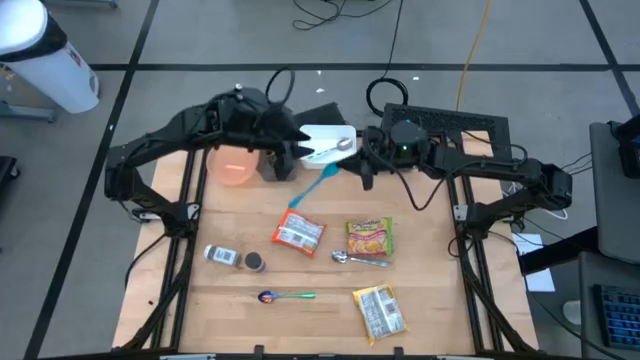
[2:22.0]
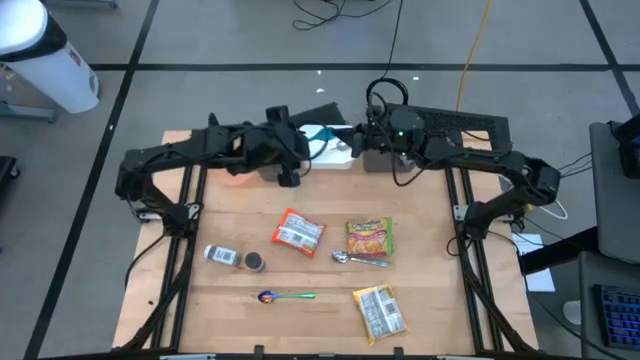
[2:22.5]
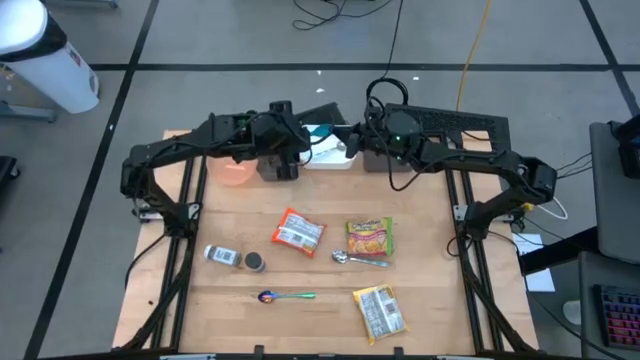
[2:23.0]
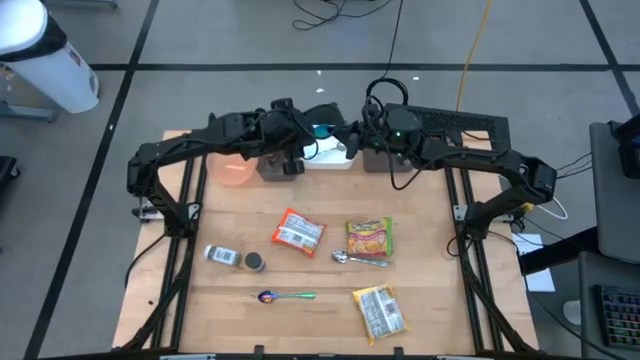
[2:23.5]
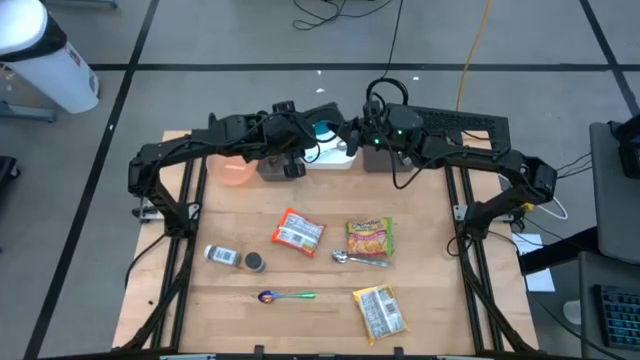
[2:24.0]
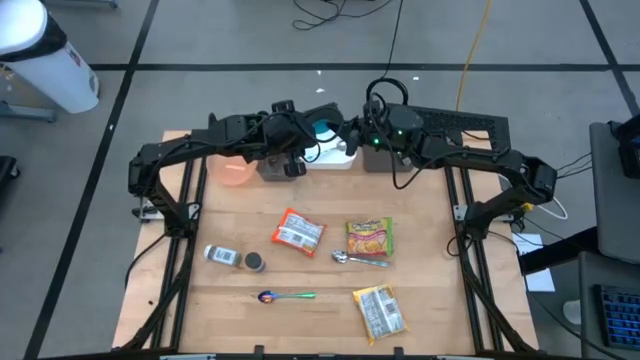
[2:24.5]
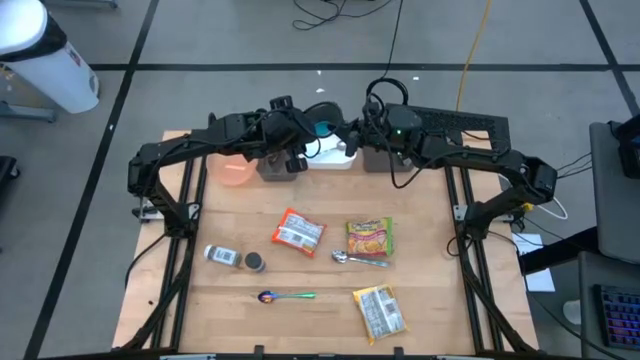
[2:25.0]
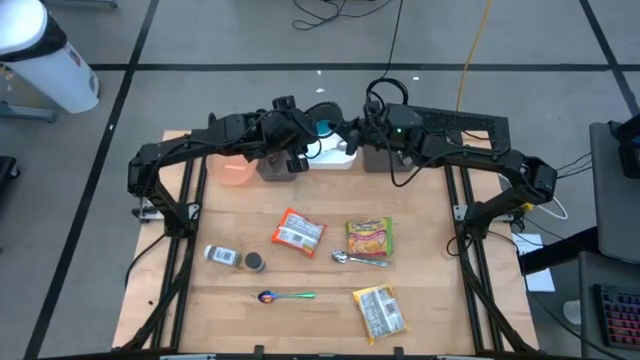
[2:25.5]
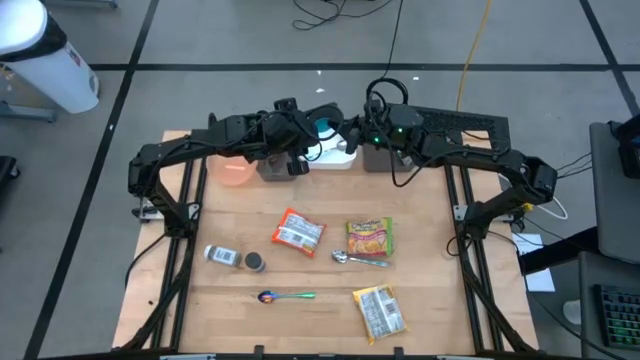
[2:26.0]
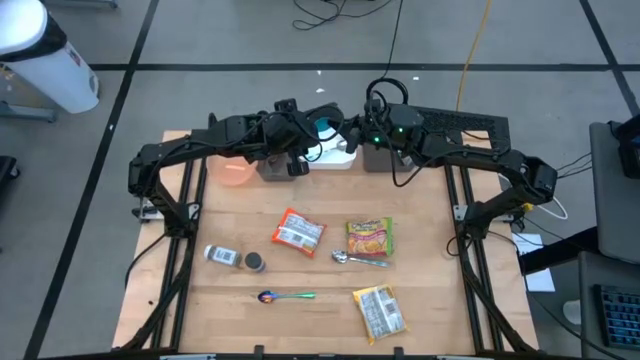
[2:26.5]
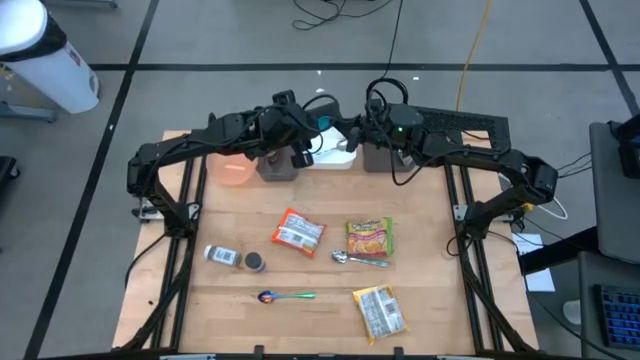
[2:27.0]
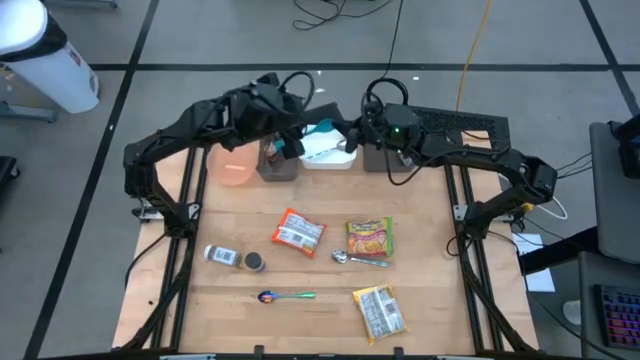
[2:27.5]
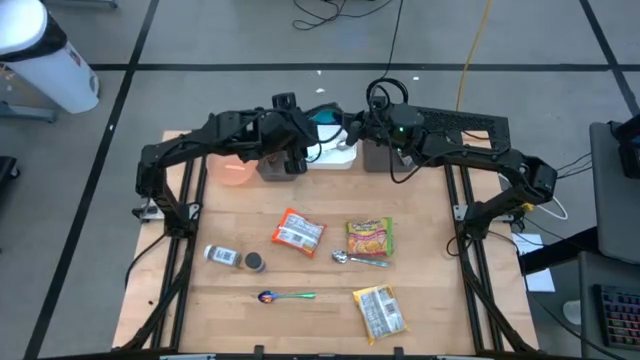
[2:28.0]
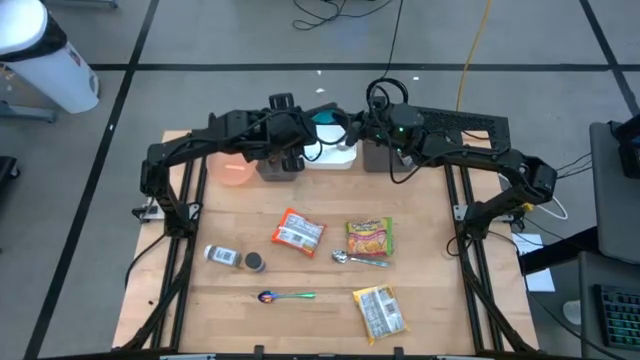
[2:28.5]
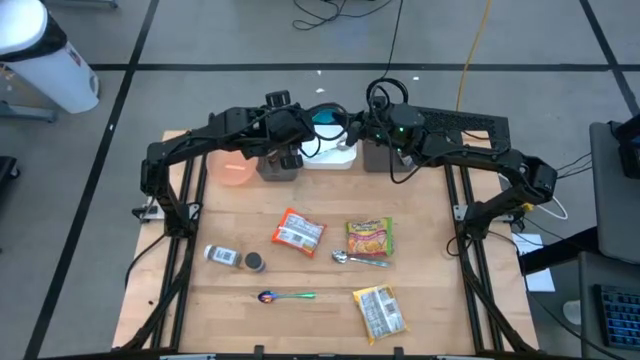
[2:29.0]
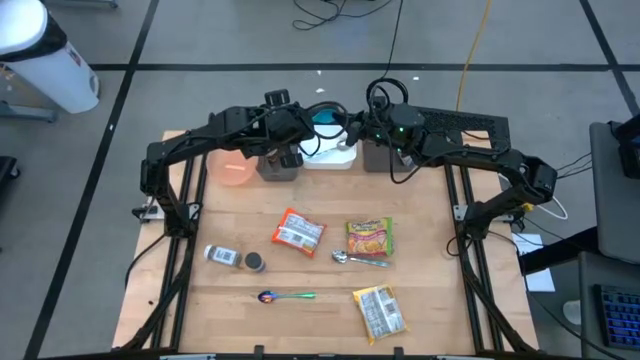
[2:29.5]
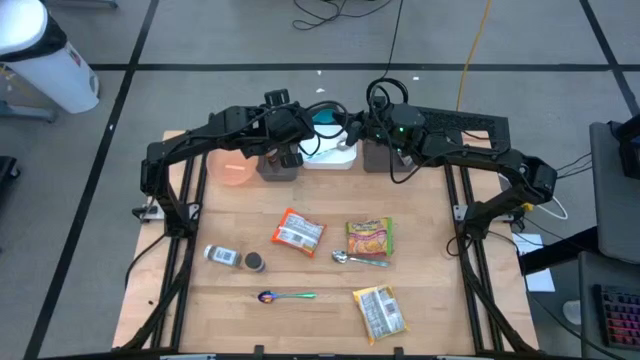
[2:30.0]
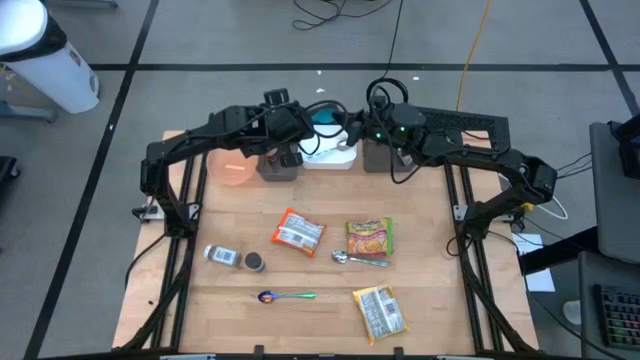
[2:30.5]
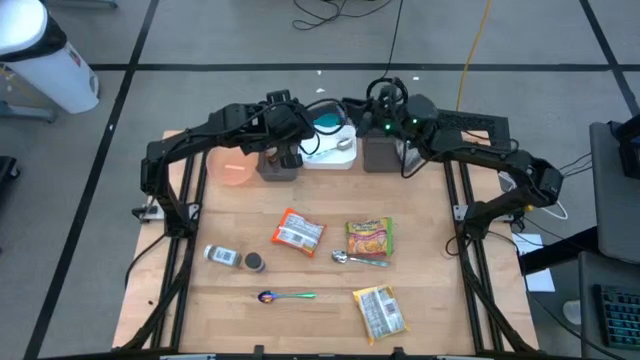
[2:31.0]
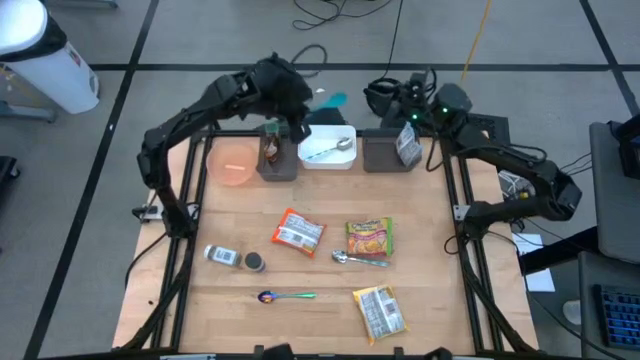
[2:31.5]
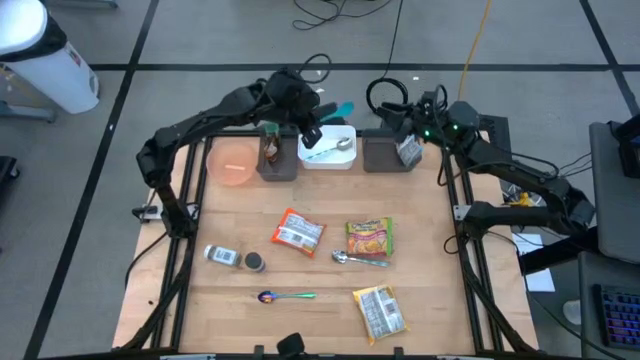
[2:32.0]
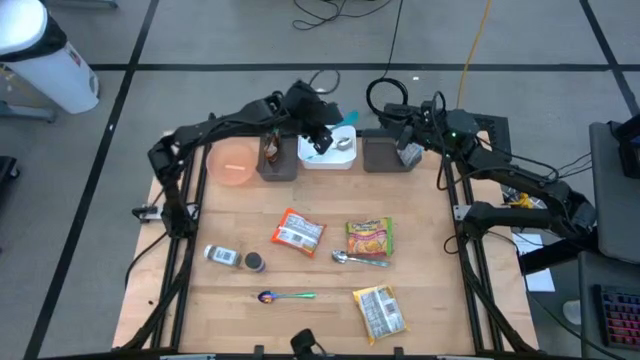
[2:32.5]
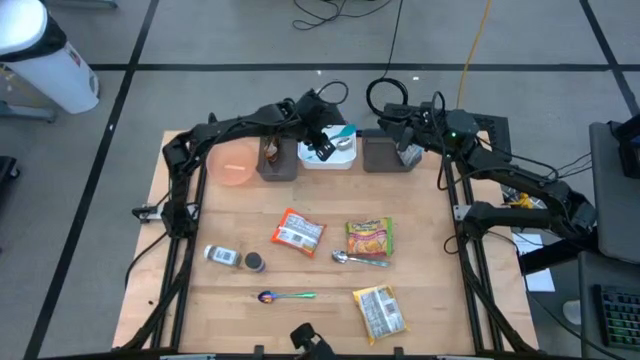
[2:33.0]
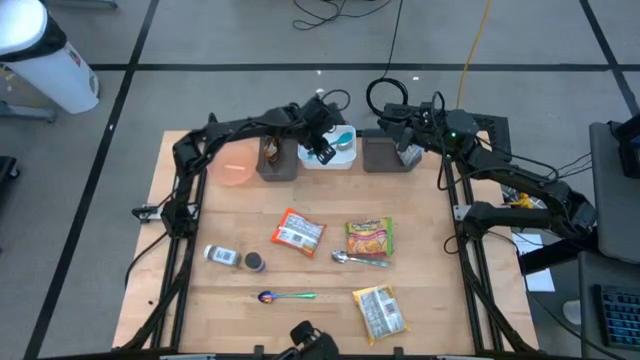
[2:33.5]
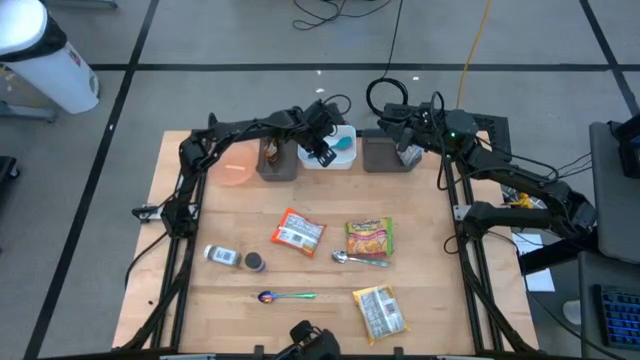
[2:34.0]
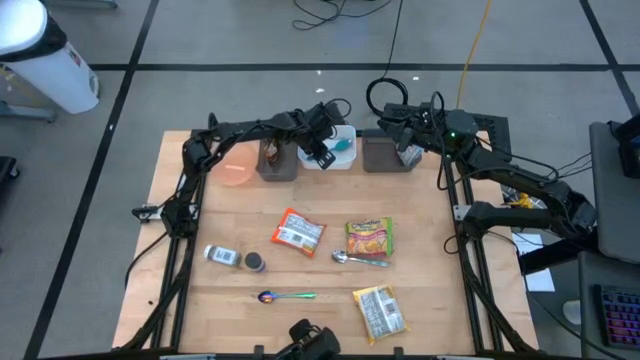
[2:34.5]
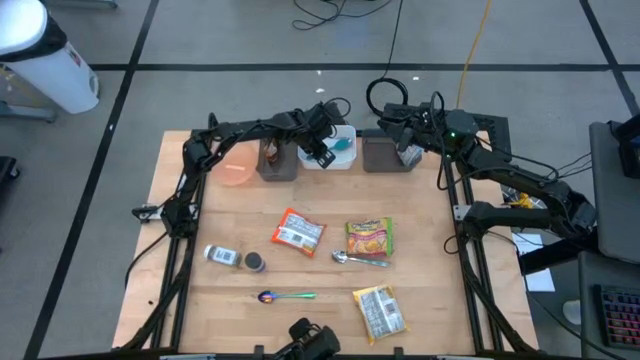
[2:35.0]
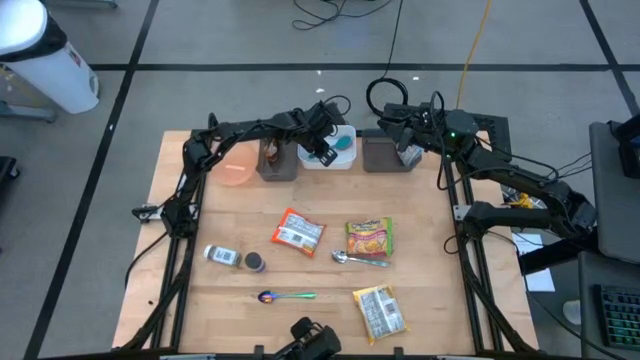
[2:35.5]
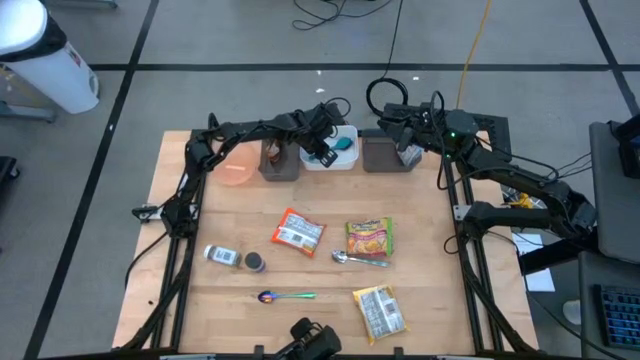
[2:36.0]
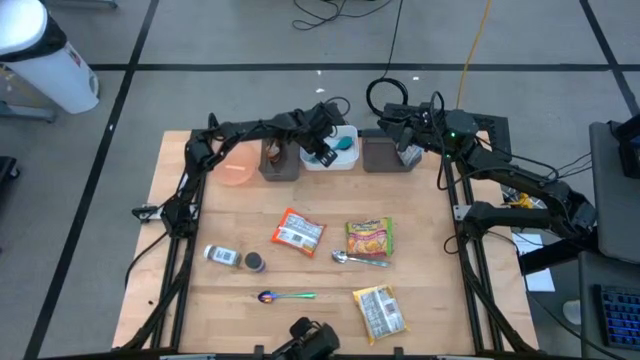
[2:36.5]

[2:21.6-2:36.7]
Task: Pick & Place Food Item
Put the blue baby spoon into the white bin

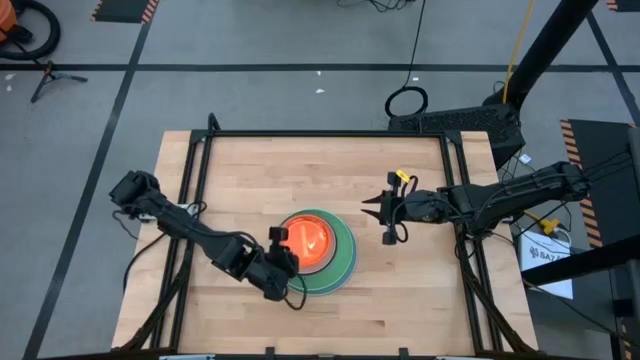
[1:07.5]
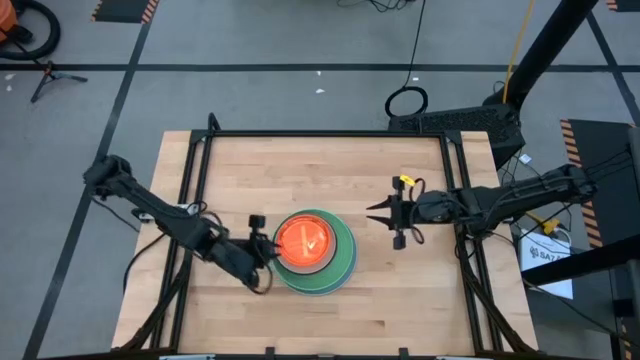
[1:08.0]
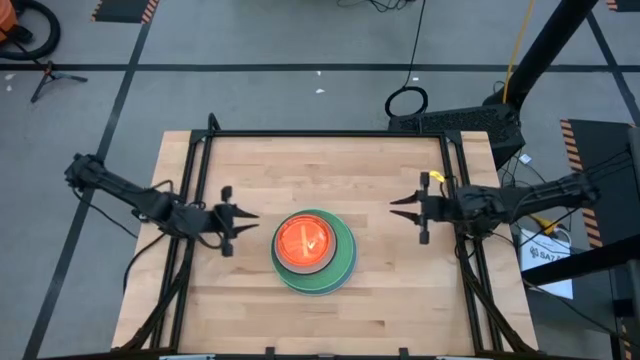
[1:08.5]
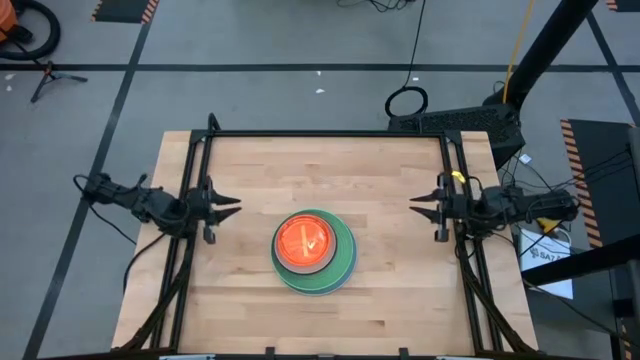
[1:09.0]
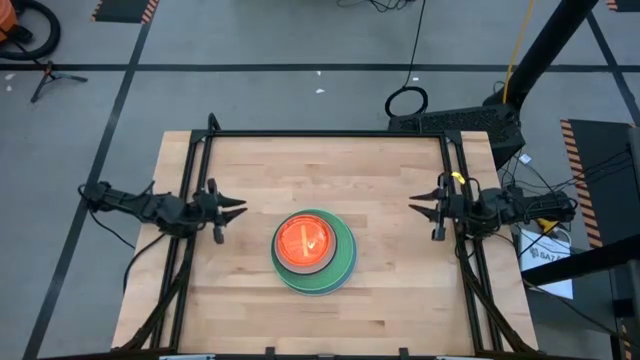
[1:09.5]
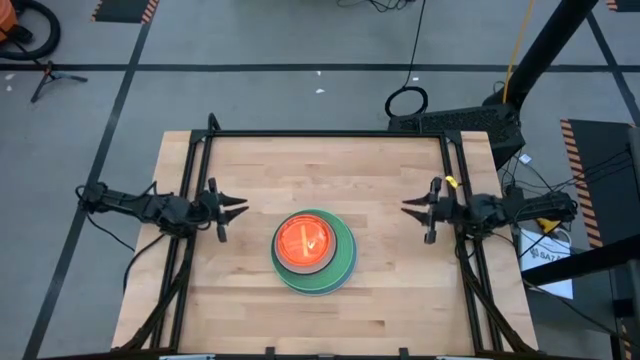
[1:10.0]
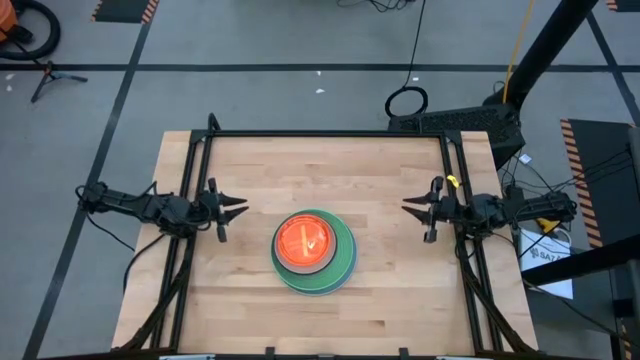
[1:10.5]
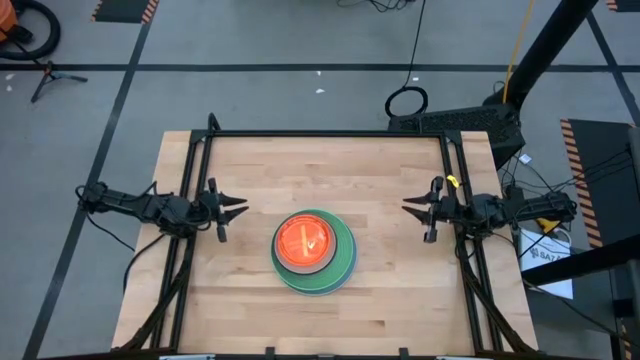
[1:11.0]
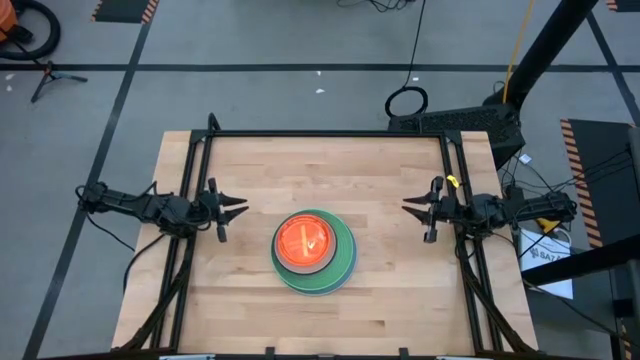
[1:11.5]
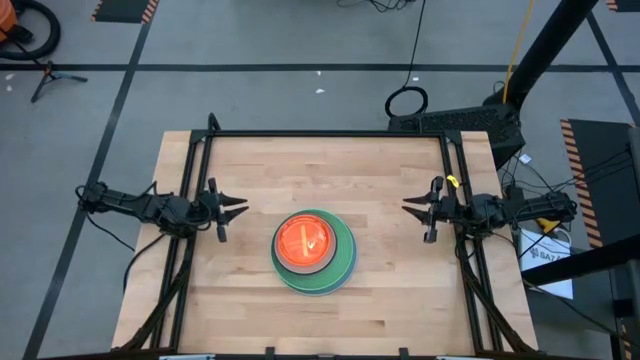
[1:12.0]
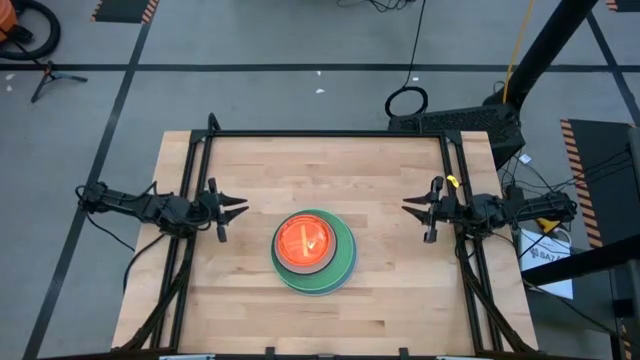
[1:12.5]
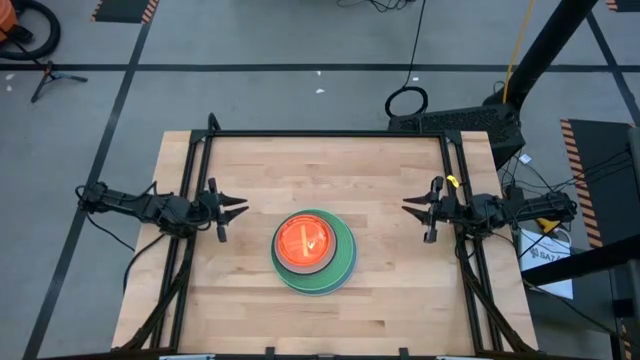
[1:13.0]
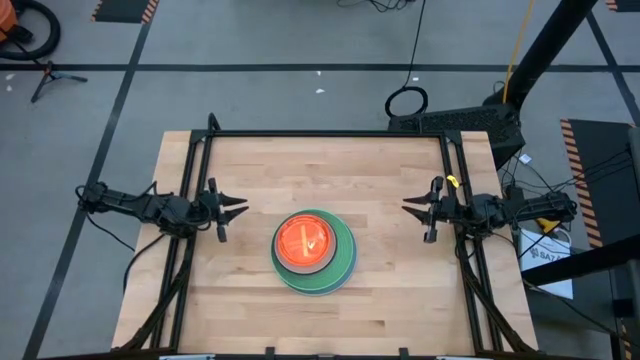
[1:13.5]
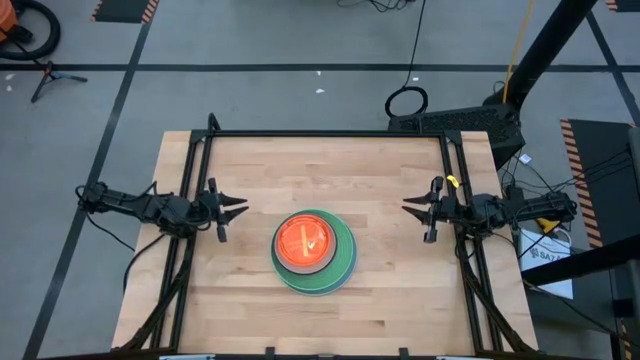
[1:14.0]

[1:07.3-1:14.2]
Task: Stack plastic plates
Return to Home Position
